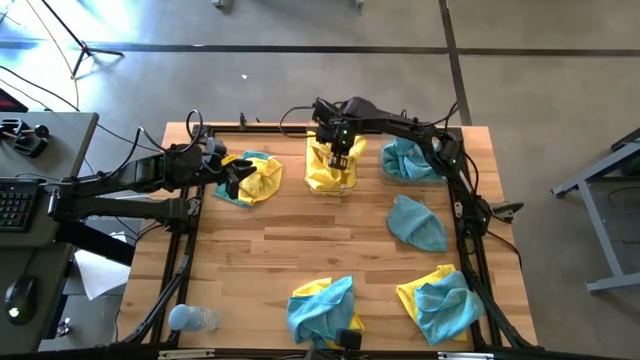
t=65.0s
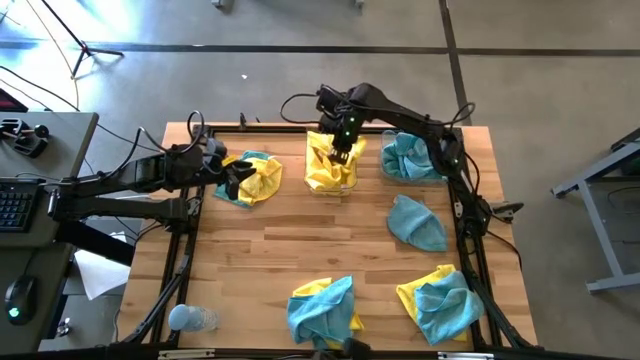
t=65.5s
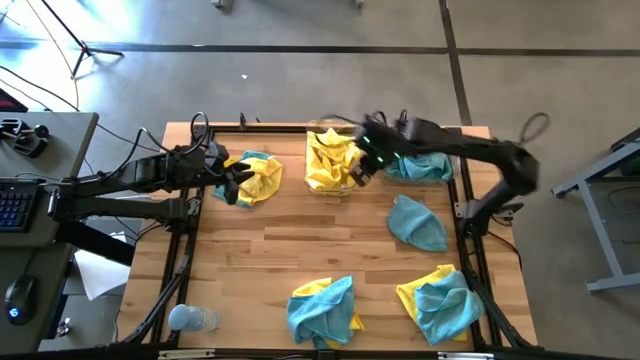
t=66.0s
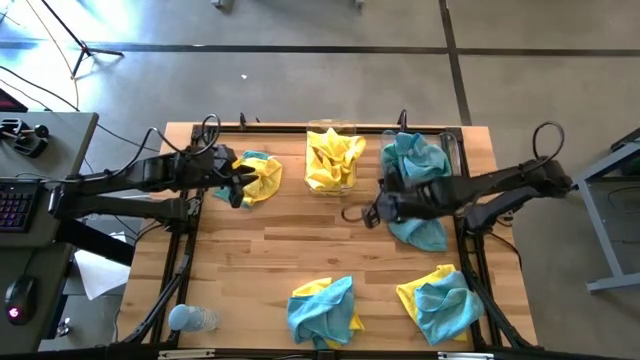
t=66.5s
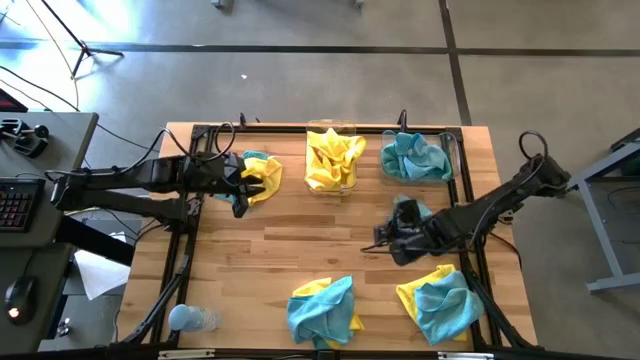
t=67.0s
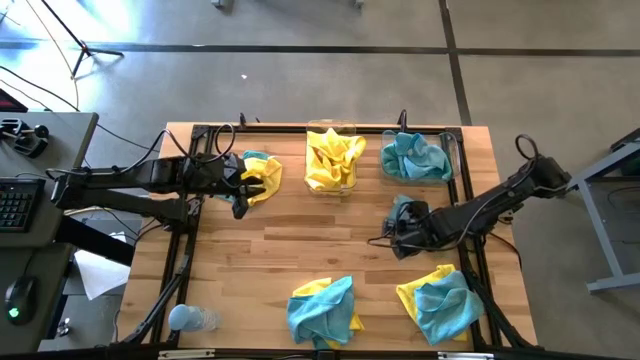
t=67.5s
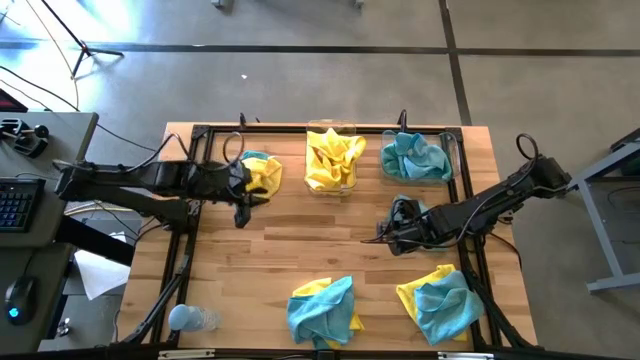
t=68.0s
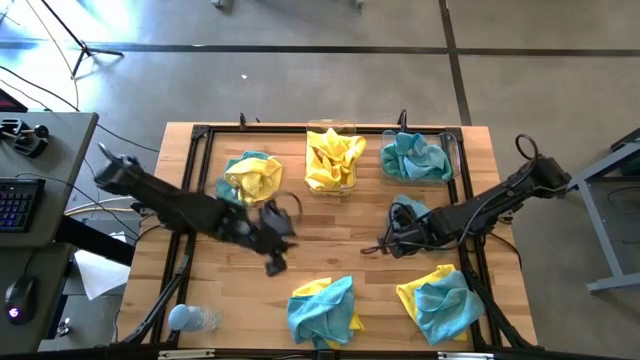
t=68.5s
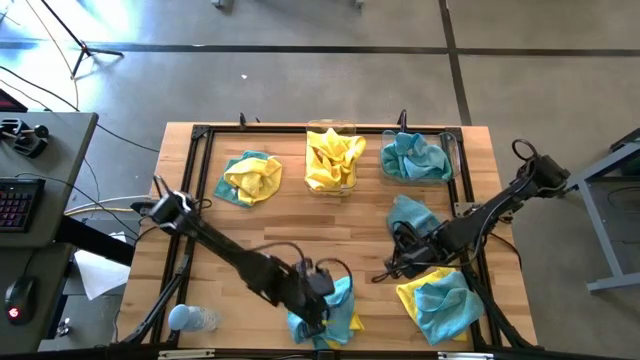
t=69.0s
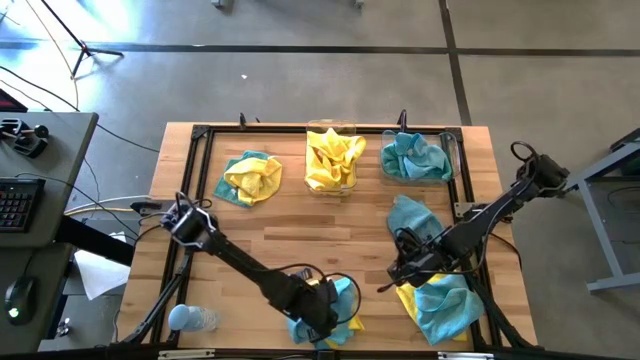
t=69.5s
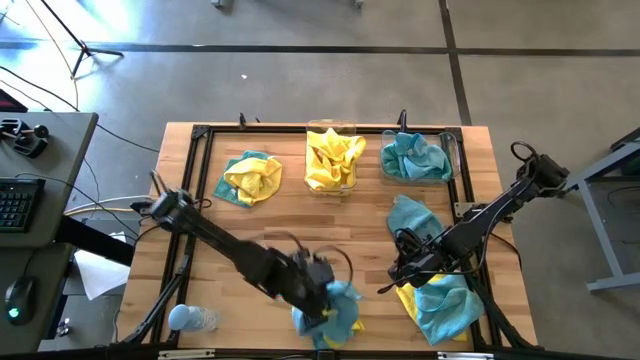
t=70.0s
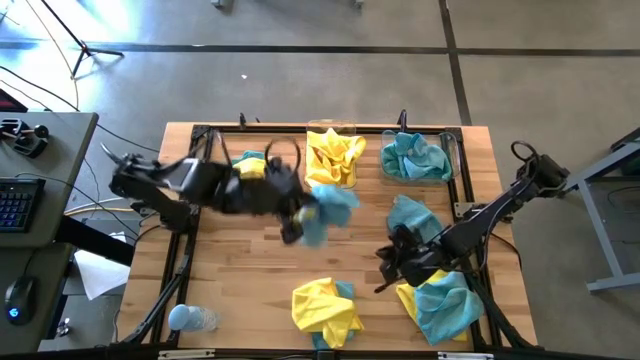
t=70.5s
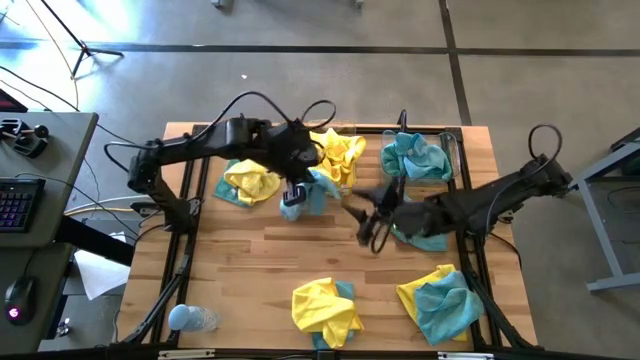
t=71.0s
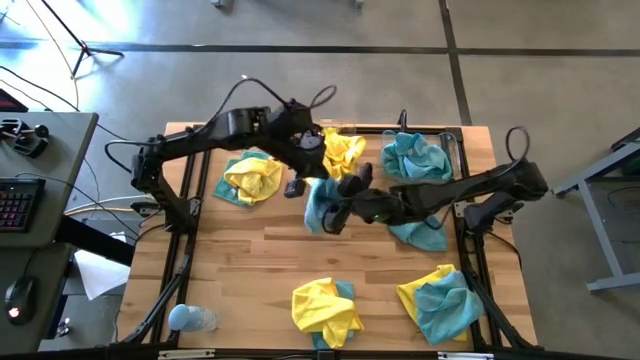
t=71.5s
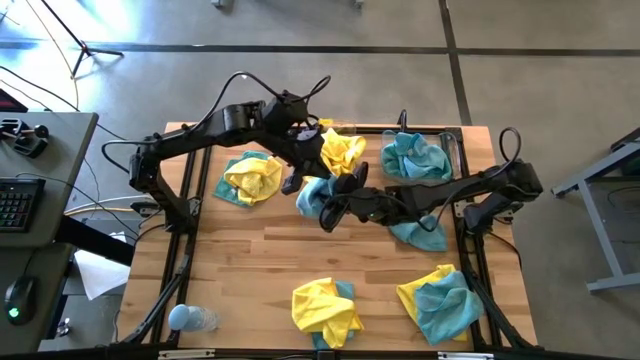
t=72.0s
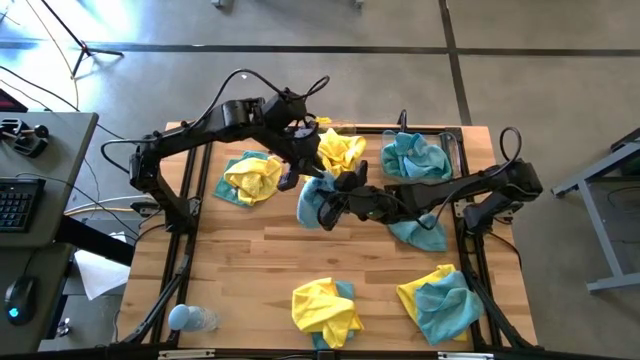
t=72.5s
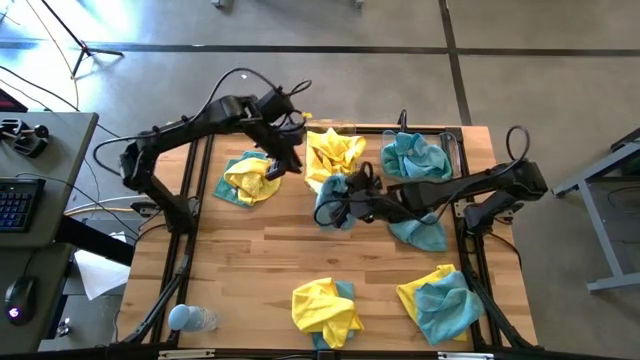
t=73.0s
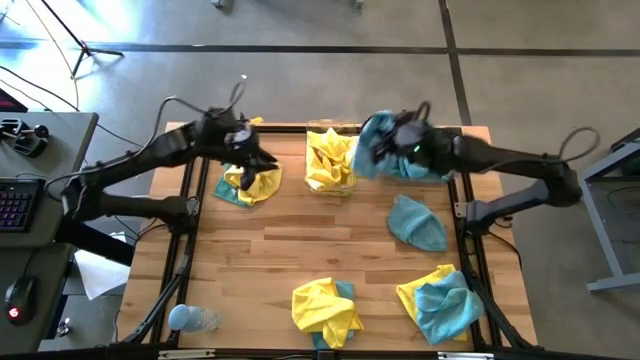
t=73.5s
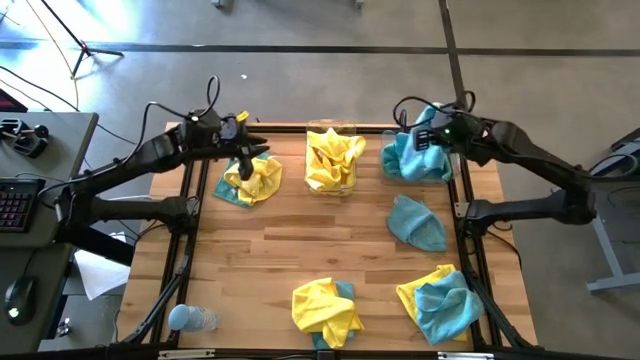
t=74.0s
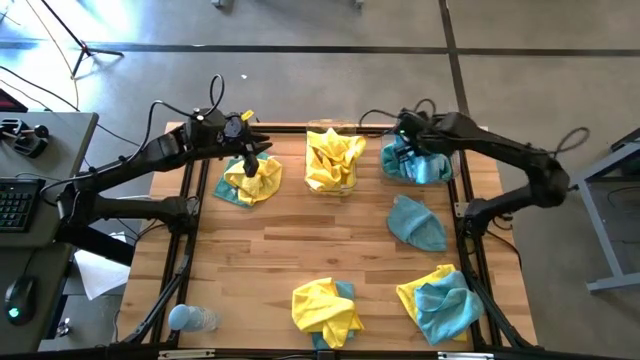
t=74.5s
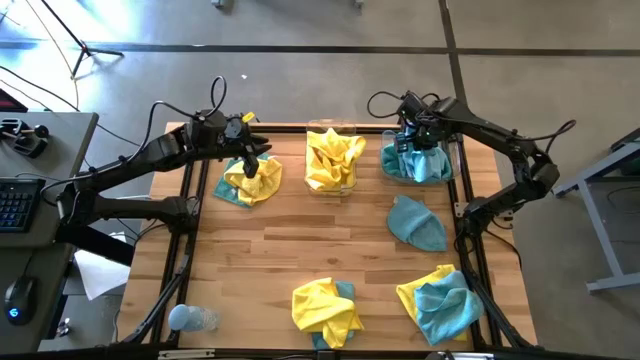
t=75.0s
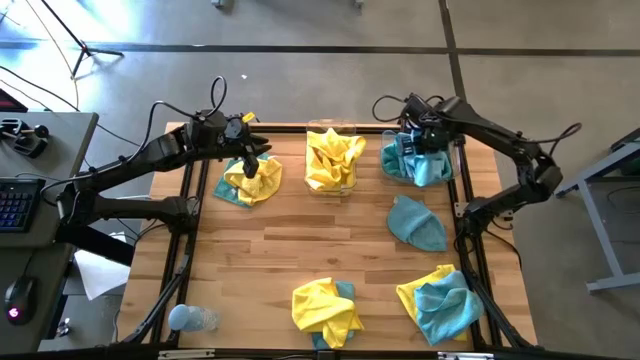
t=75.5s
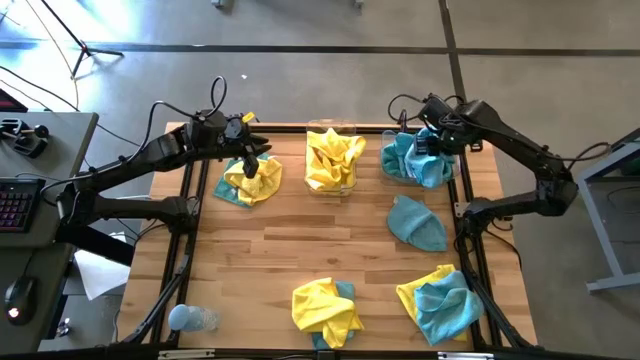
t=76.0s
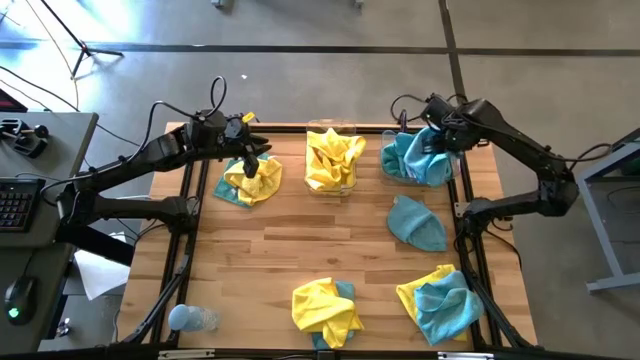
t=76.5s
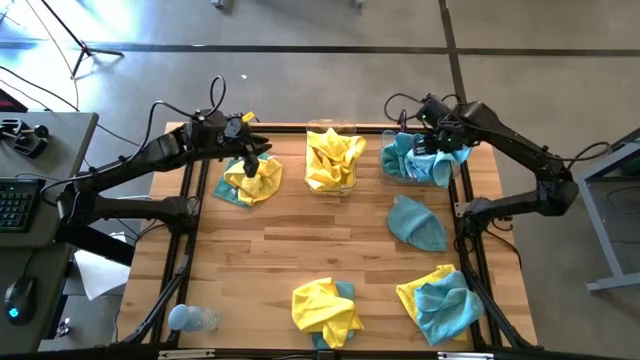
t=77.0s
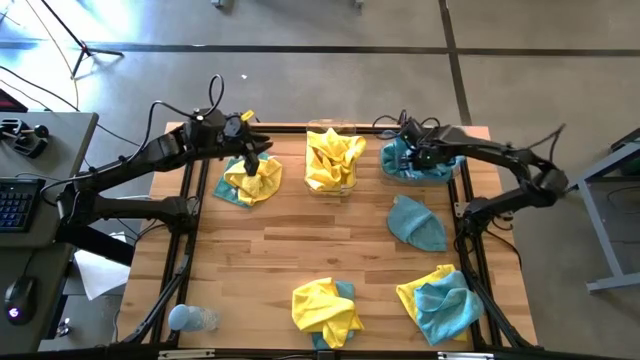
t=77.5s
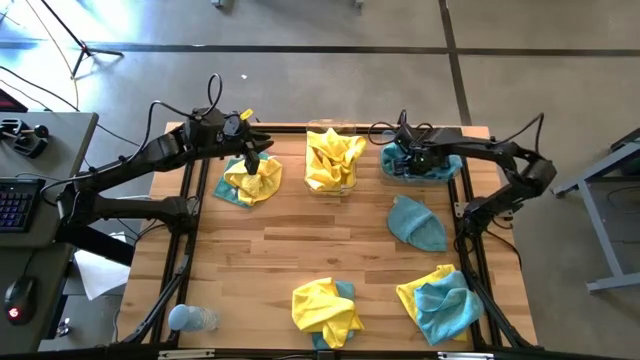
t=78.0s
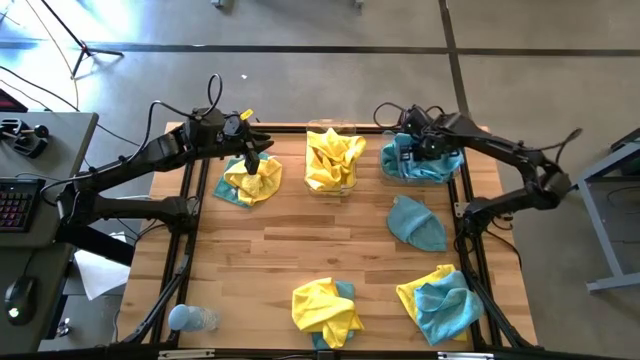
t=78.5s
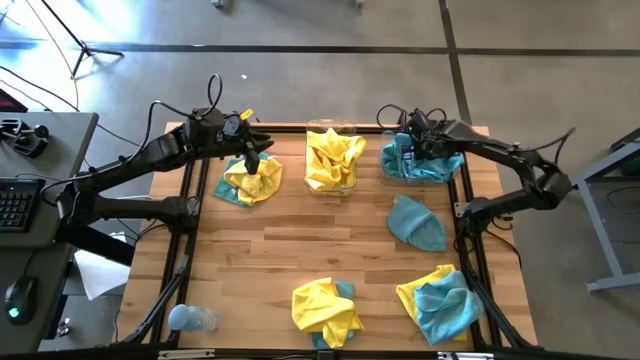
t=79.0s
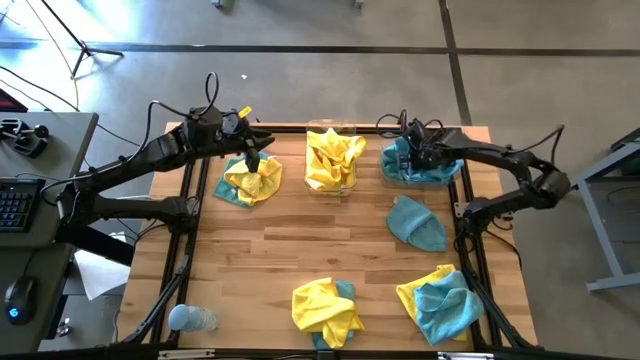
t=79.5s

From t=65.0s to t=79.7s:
Task: Sort microfiber towel by color & place in baskets
Put the blue towel into the right transparent bin

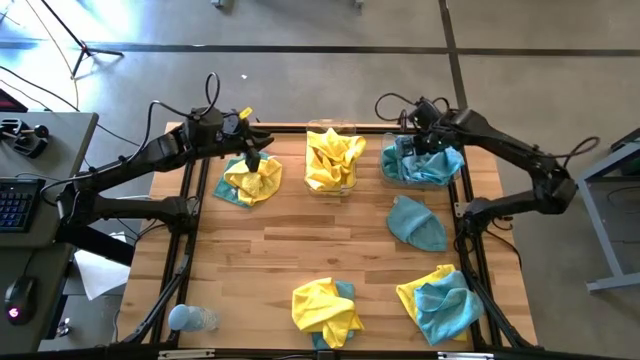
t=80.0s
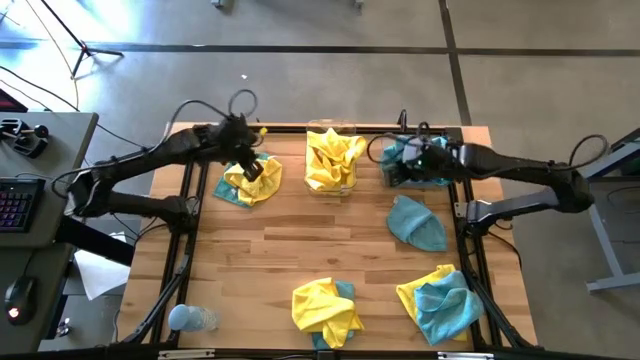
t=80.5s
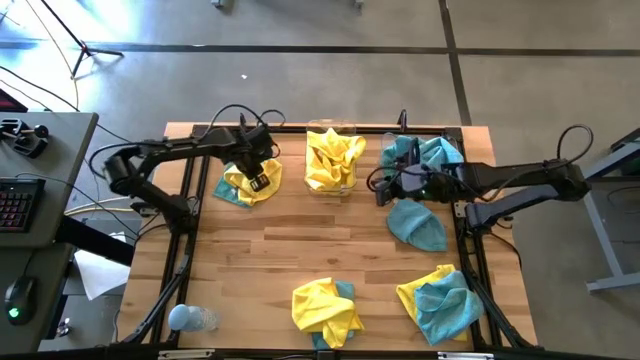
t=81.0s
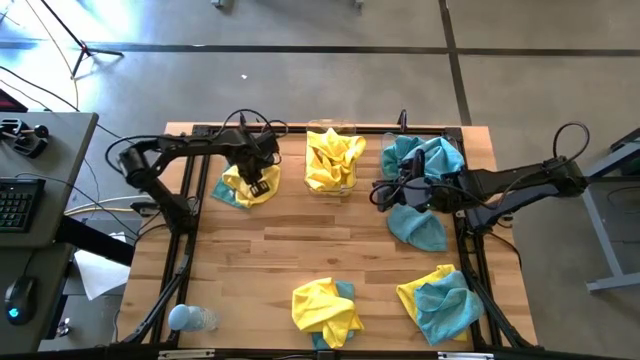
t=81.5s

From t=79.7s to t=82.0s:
Put the yellow towel into the left transparent bin

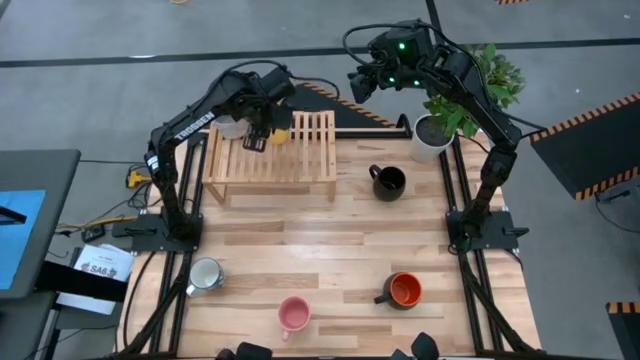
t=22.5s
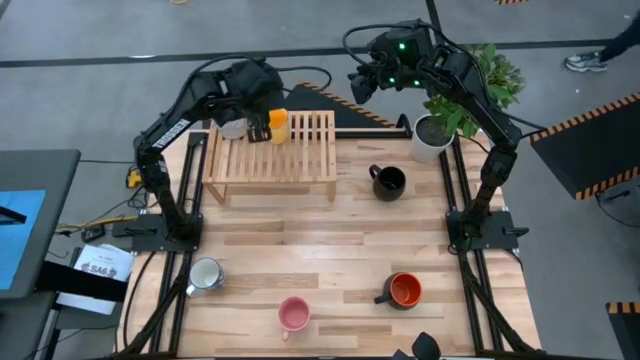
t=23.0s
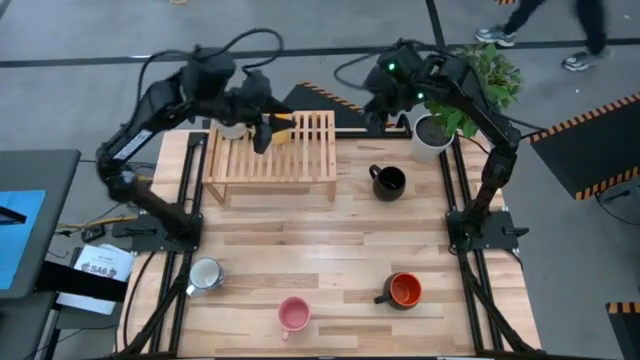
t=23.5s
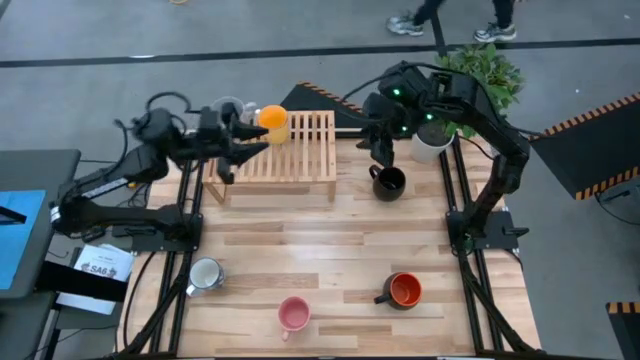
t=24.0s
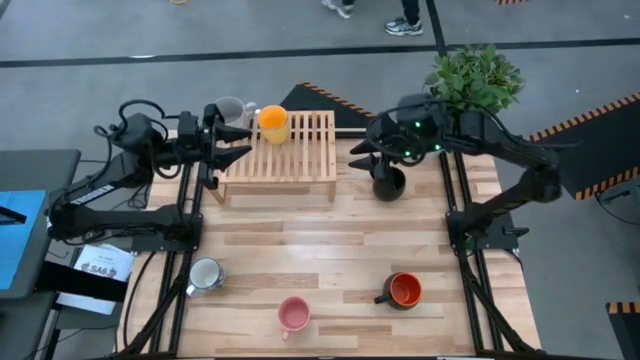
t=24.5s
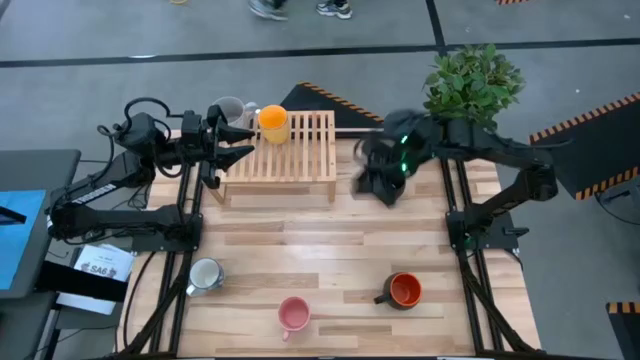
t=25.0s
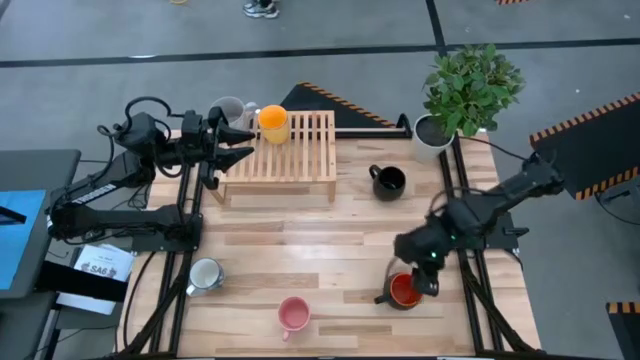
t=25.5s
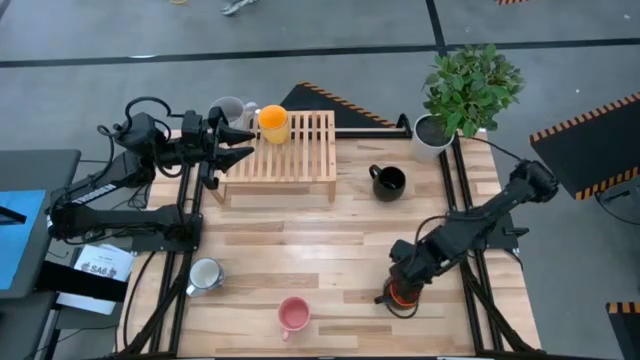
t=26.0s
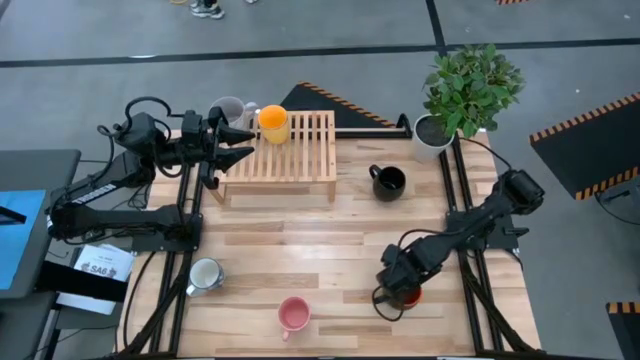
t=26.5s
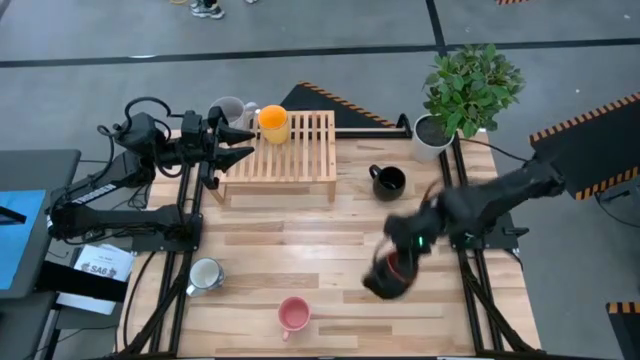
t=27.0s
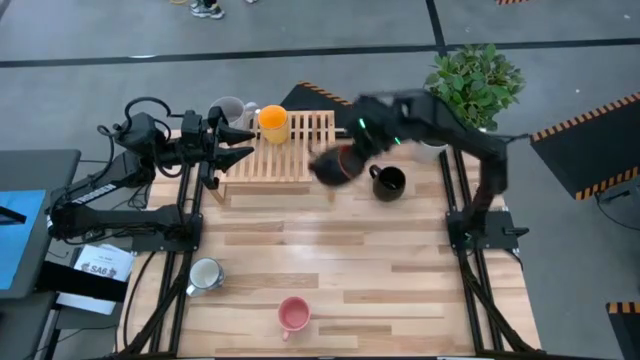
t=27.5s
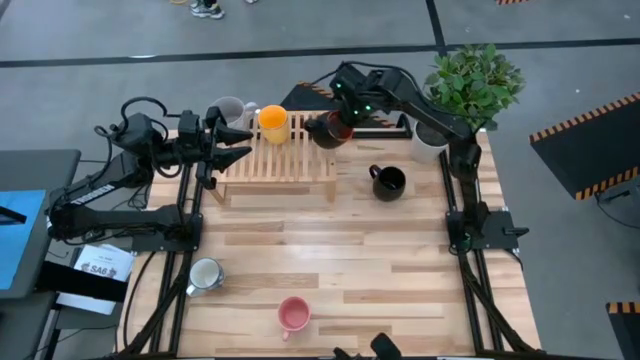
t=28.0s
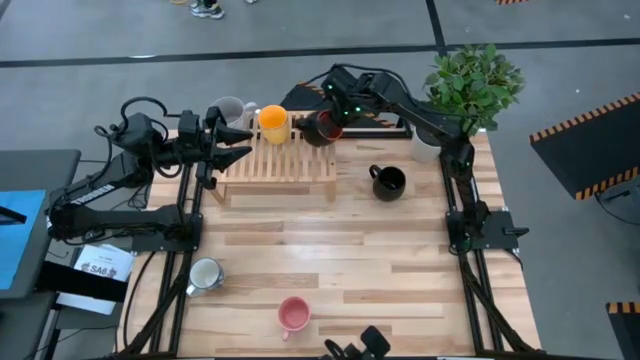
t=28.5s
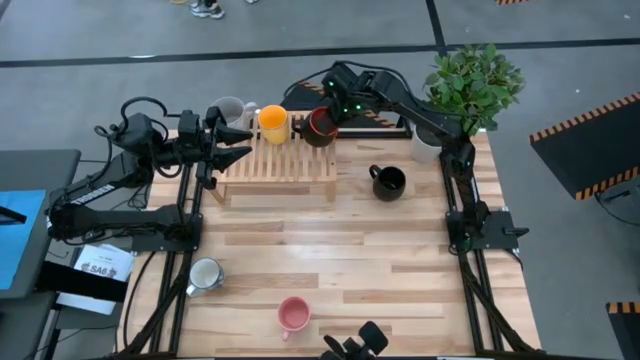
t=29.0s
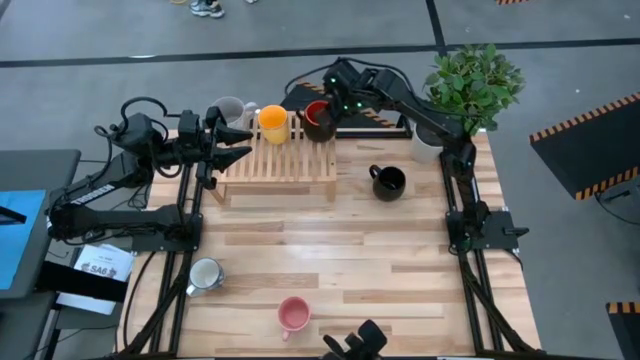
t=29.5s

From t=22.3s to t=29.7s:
Task: Place coffee mugs
Put the orange and black mug on the shelf
